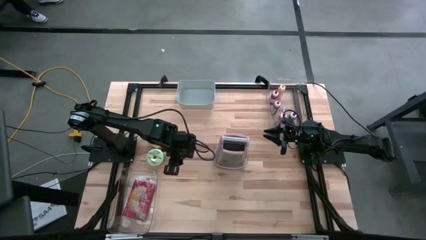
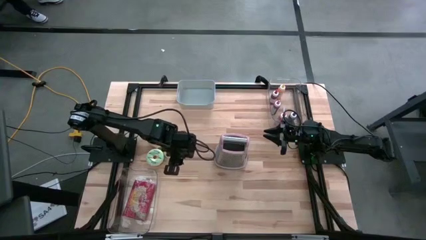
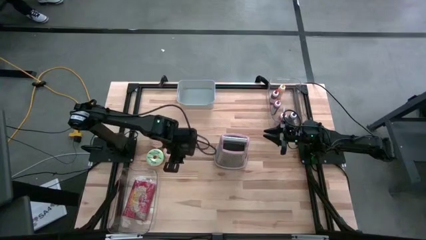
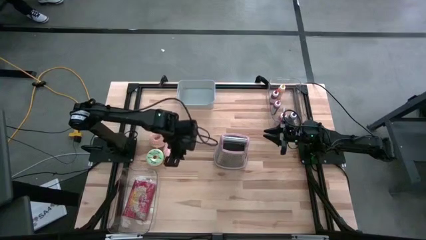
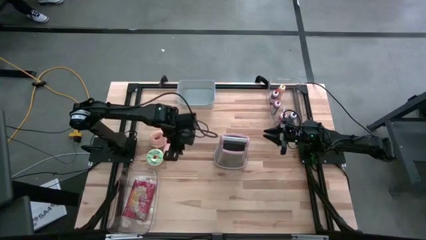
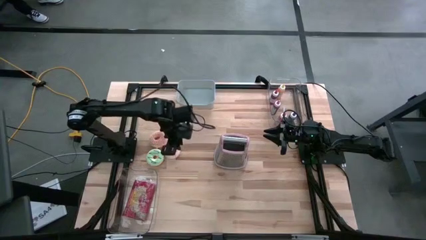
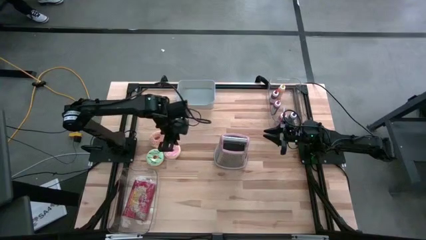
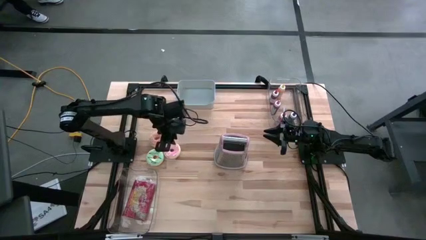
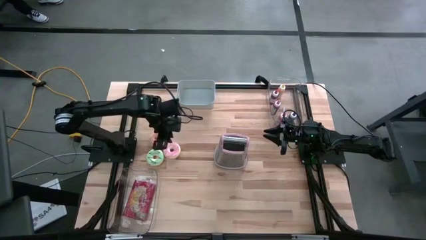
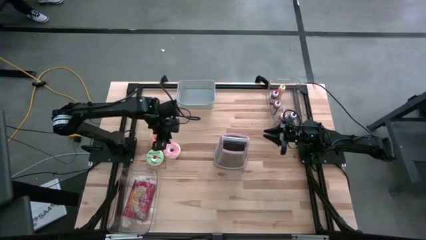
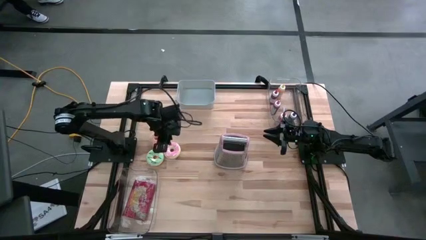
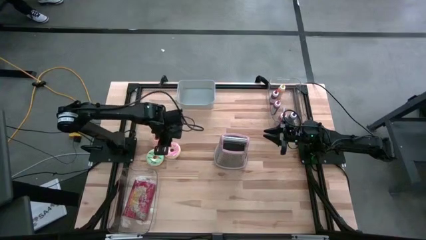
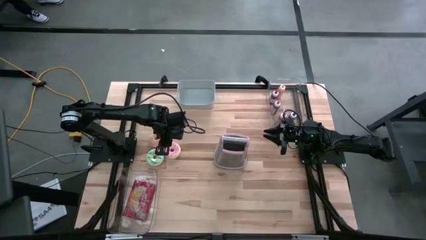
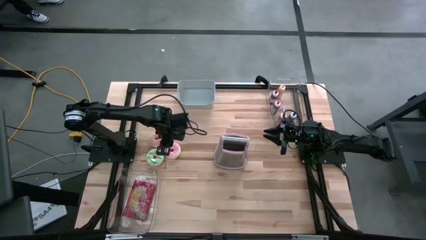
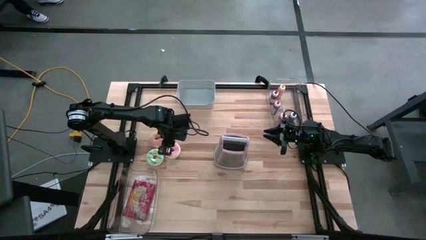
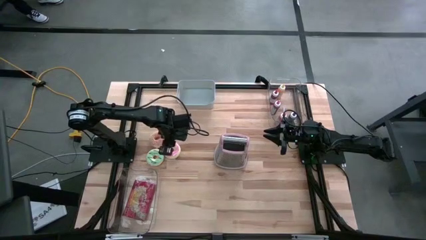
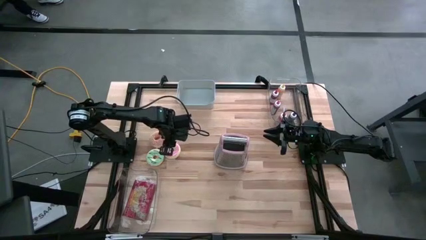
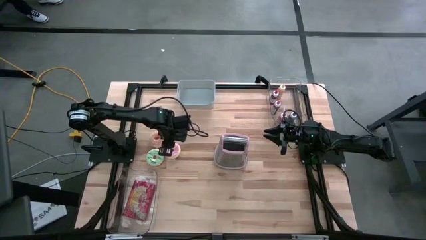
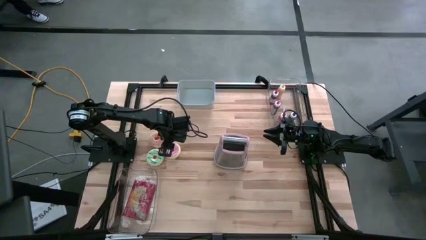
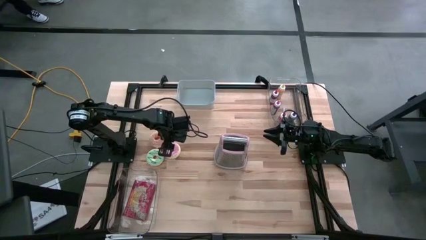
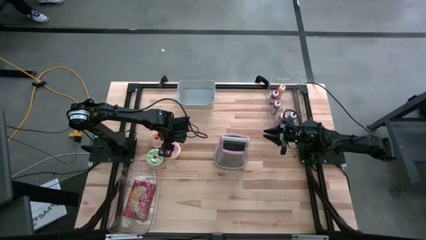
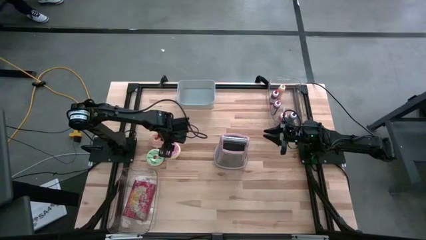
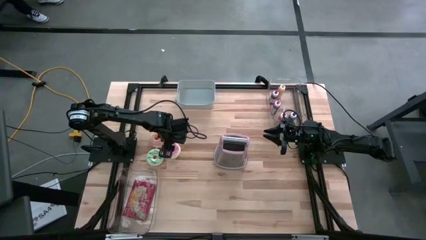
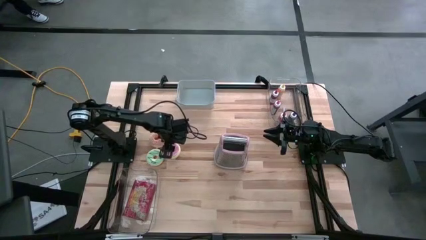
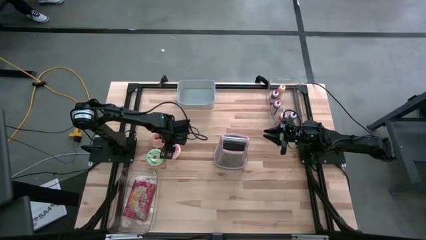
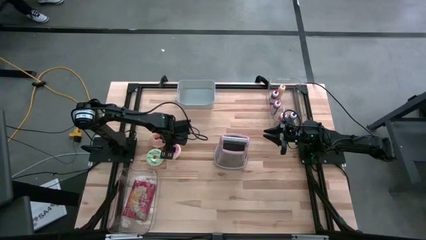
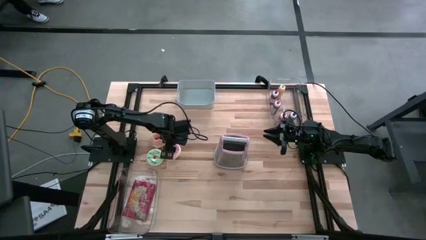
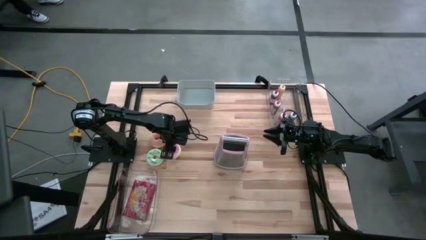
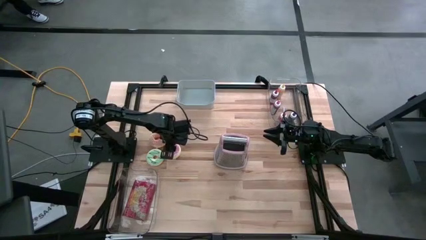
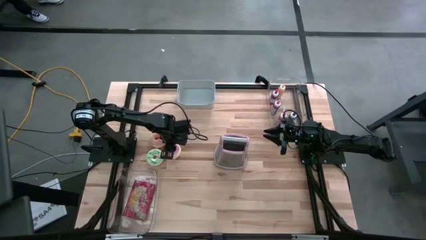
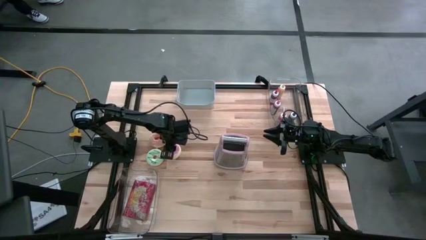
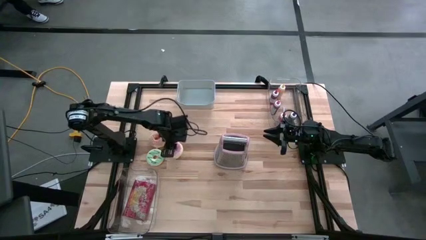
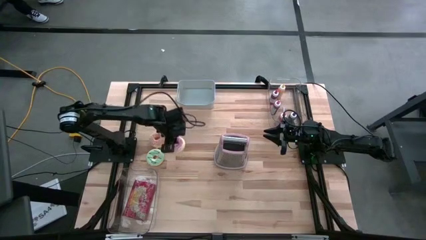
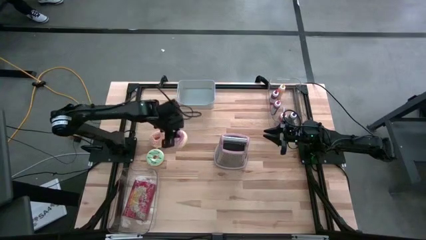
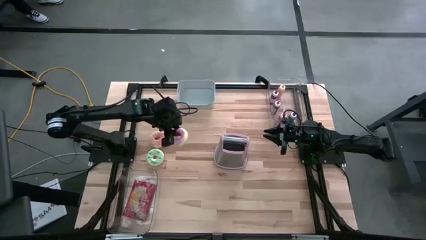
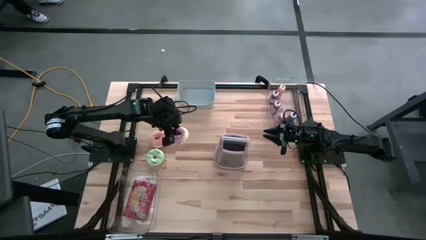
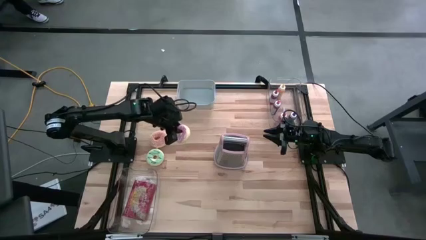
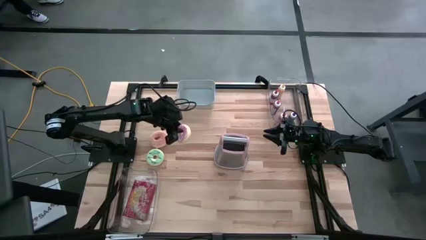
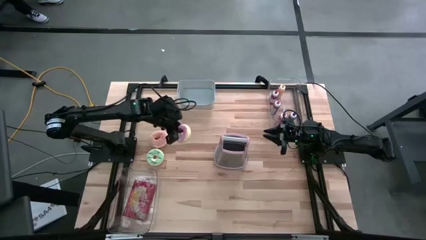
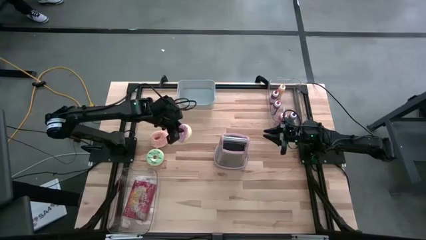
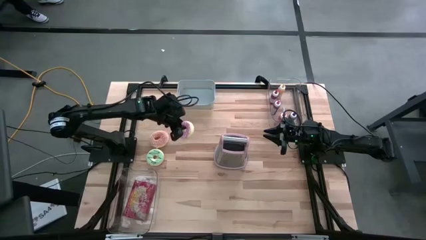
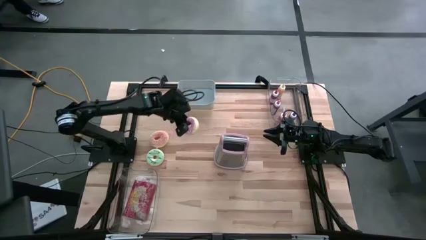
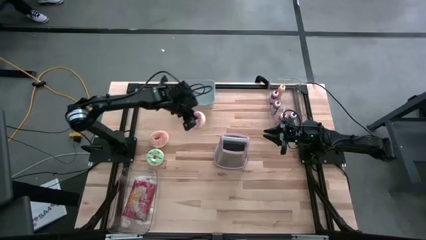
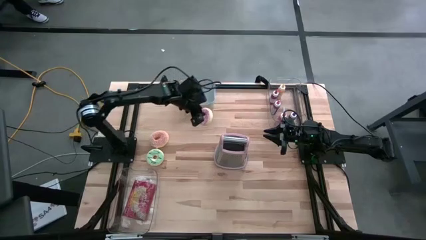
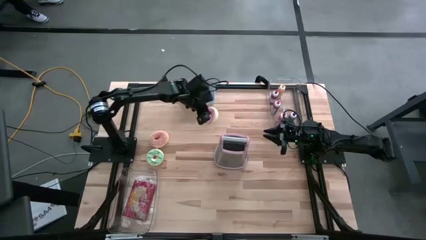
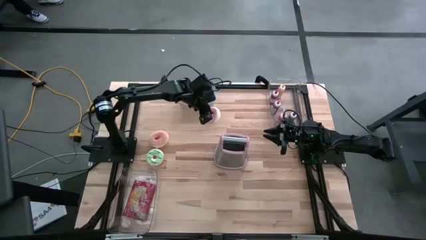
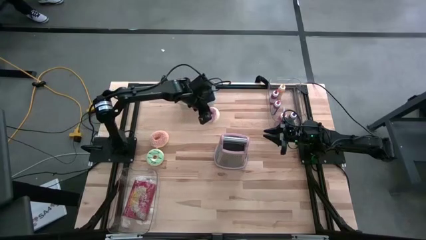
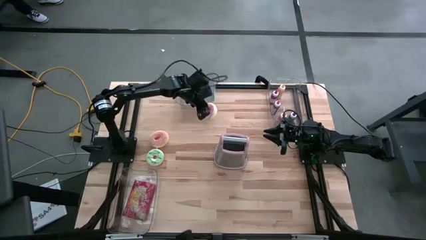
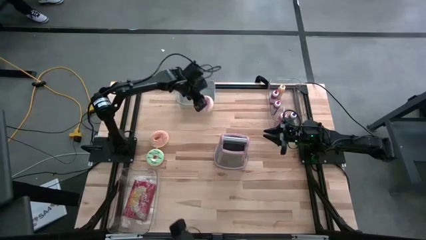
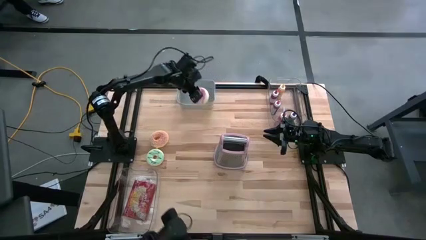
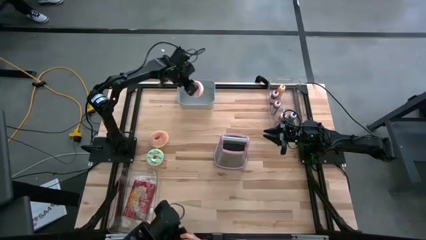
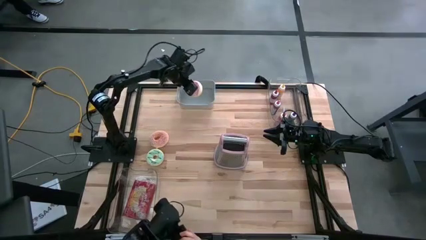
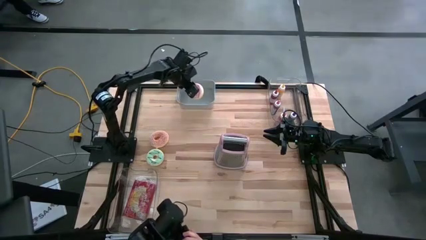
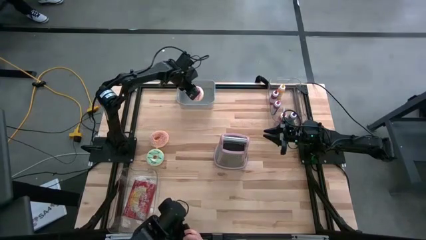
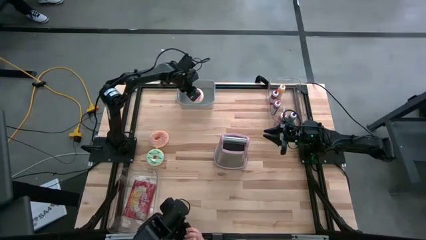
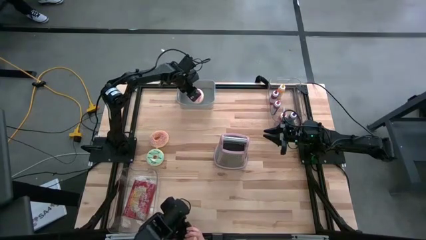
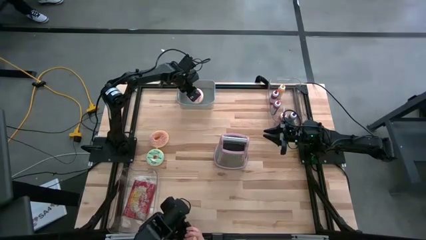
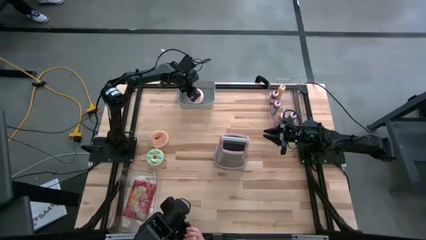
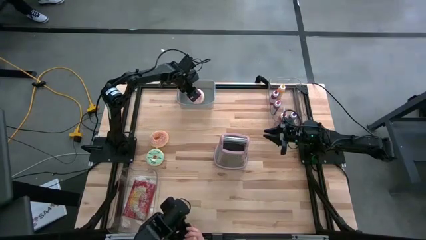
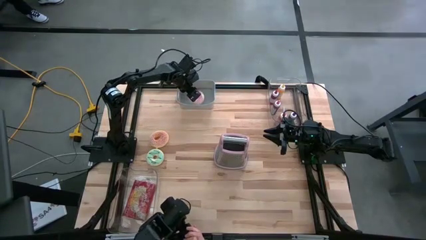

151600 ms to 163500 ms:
Put the pink donut into the gray bin
